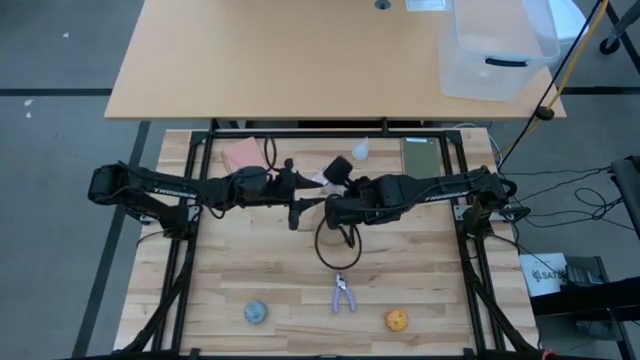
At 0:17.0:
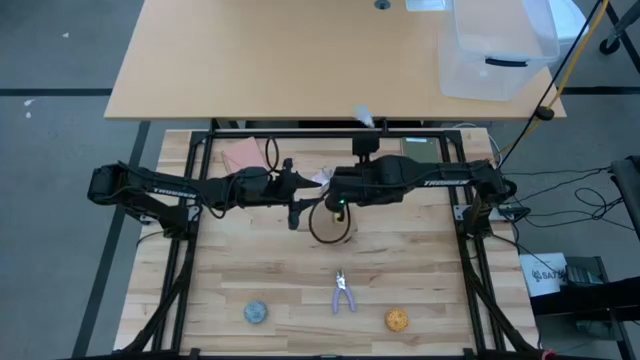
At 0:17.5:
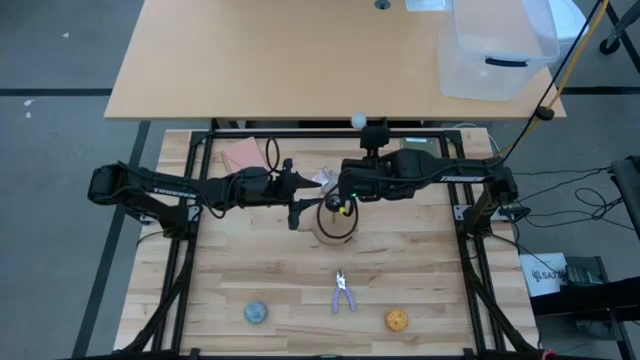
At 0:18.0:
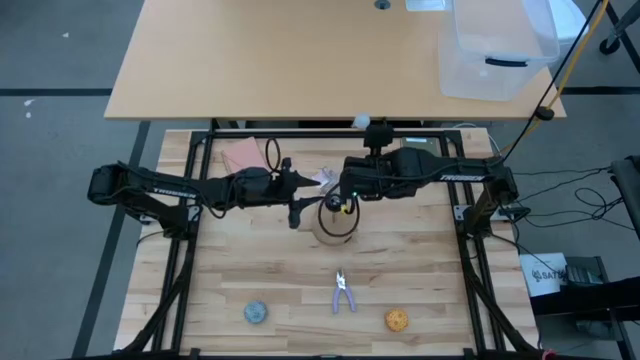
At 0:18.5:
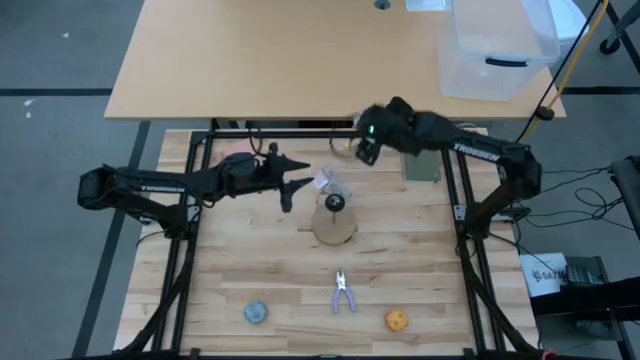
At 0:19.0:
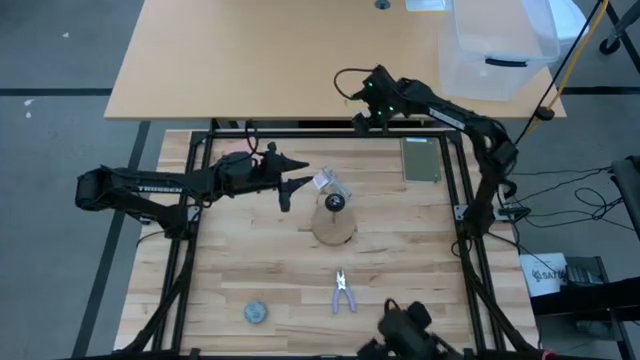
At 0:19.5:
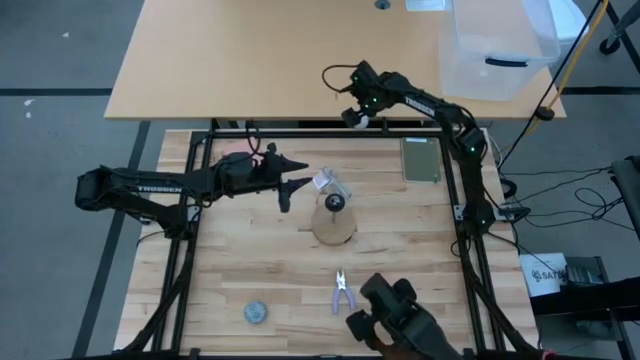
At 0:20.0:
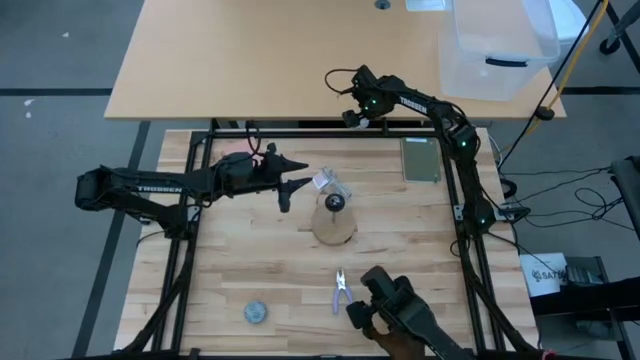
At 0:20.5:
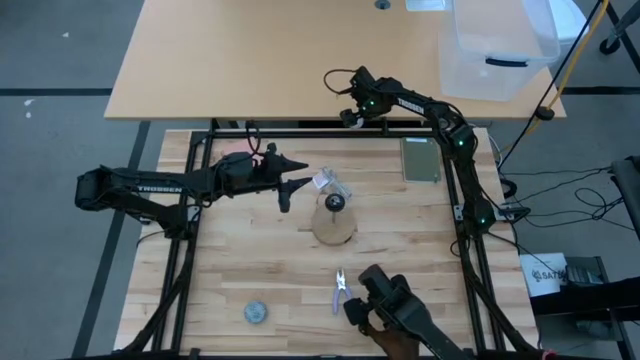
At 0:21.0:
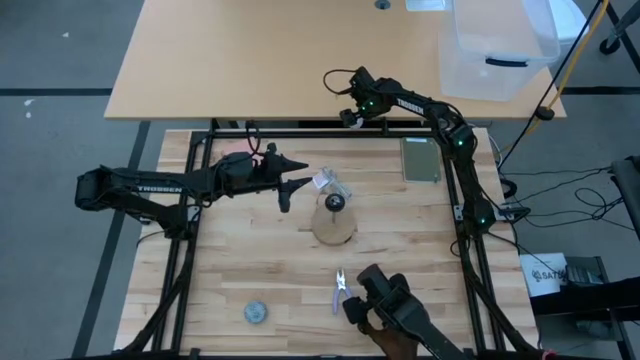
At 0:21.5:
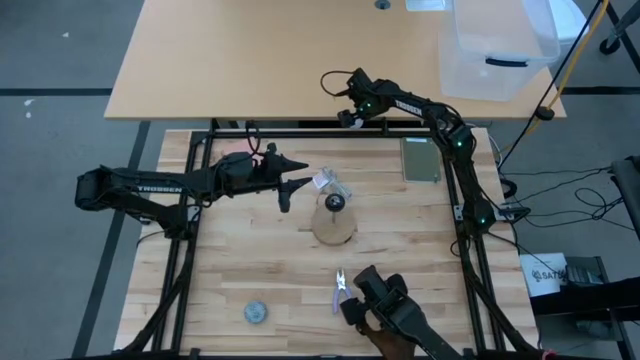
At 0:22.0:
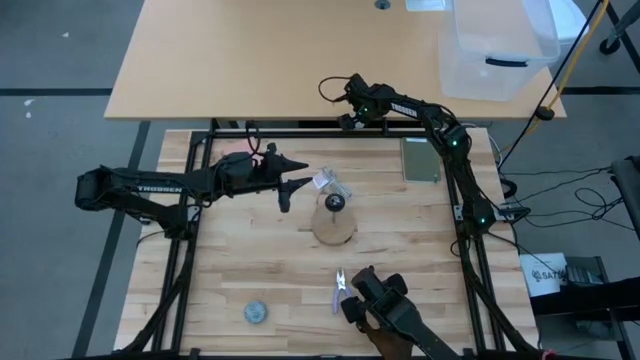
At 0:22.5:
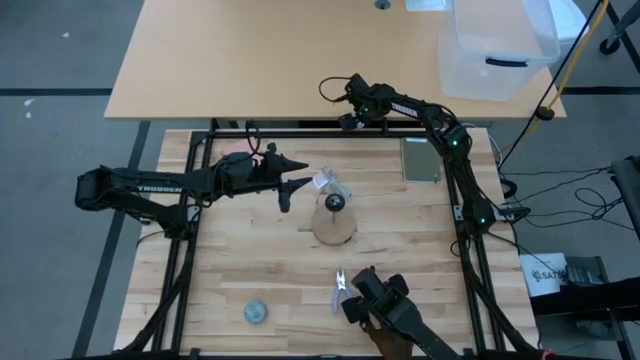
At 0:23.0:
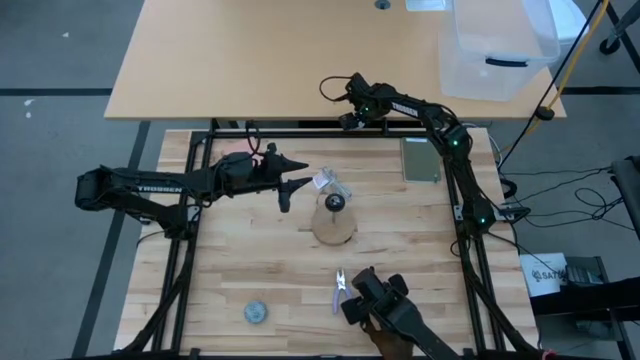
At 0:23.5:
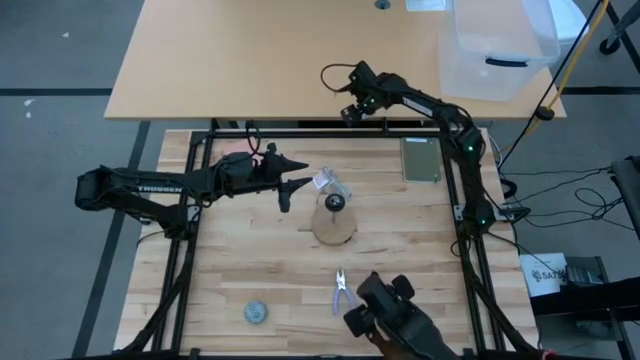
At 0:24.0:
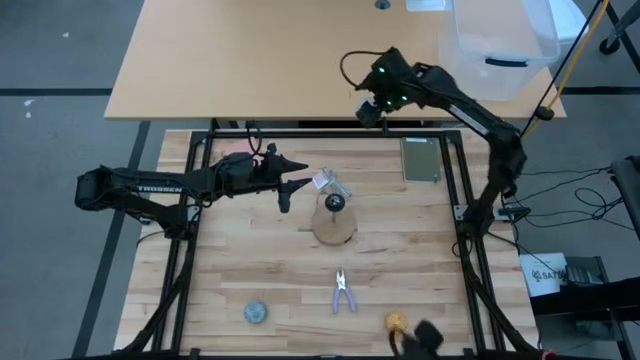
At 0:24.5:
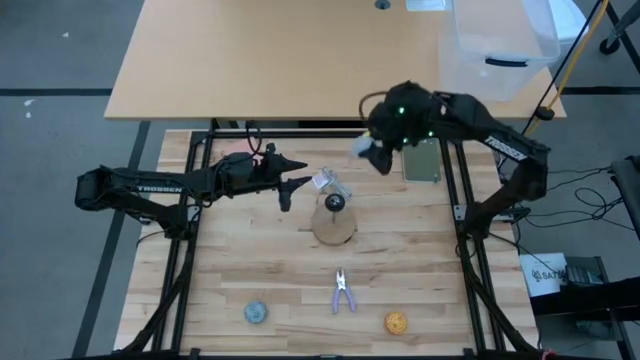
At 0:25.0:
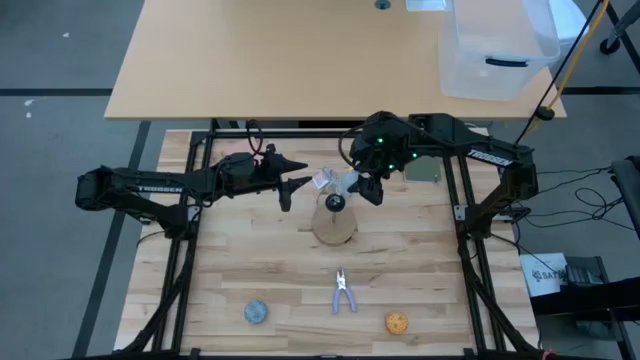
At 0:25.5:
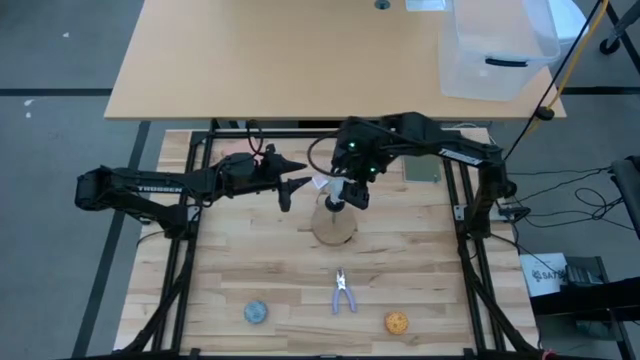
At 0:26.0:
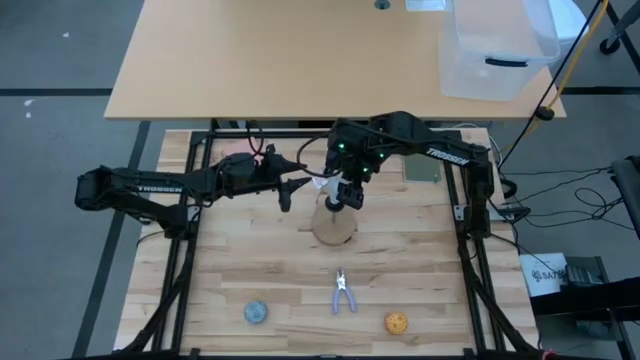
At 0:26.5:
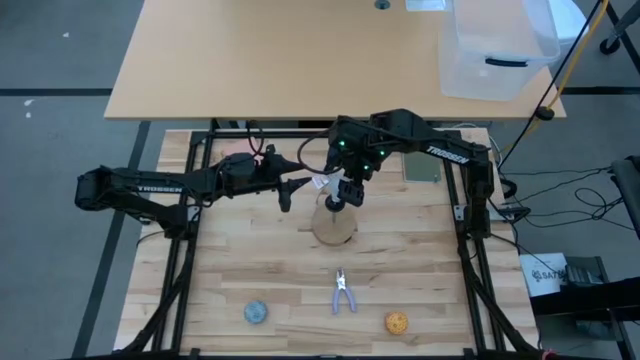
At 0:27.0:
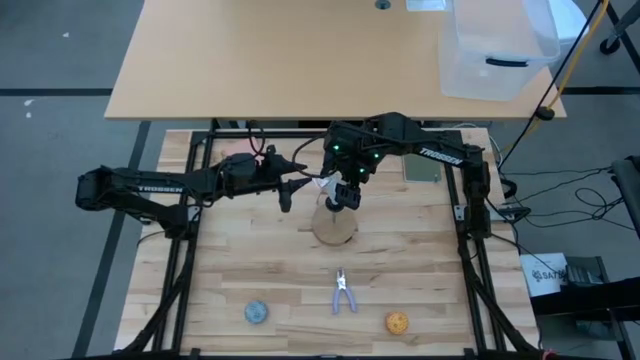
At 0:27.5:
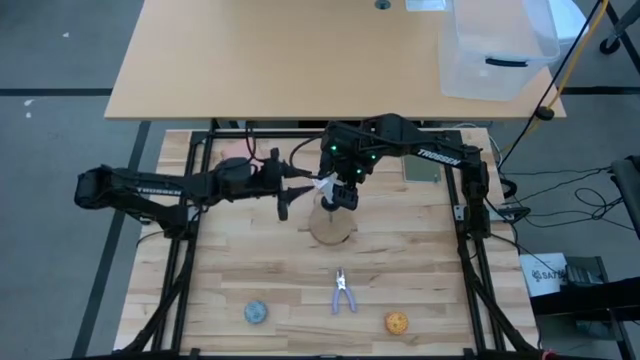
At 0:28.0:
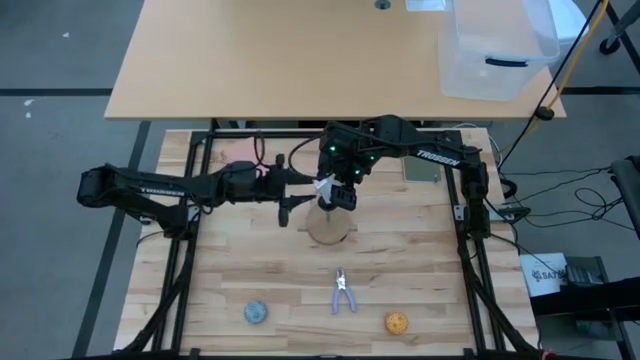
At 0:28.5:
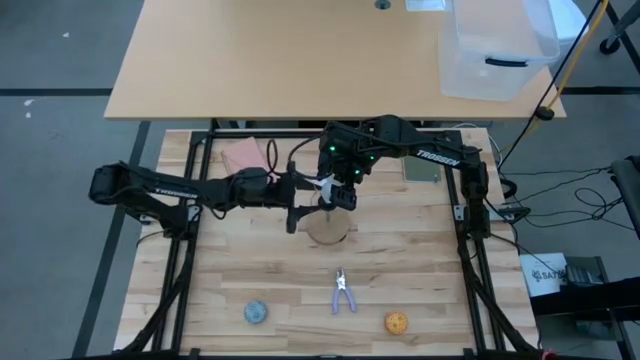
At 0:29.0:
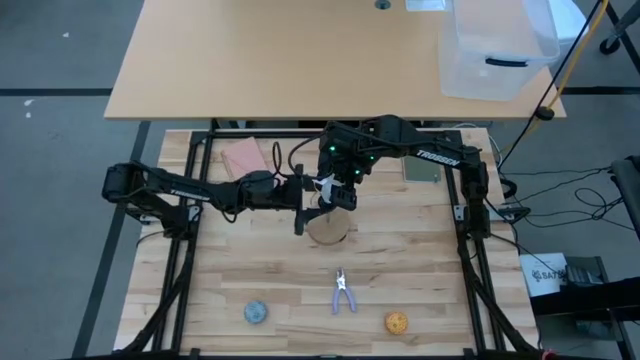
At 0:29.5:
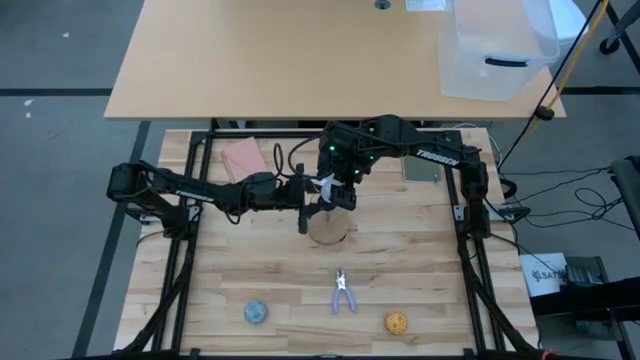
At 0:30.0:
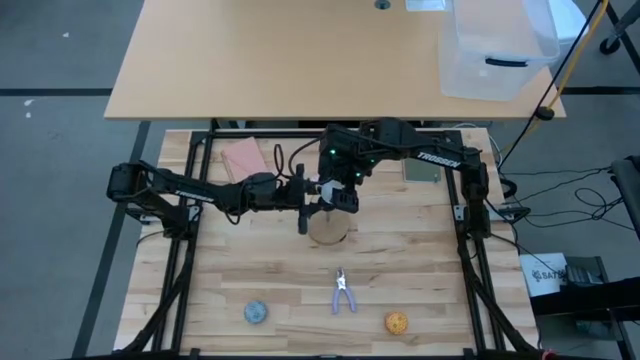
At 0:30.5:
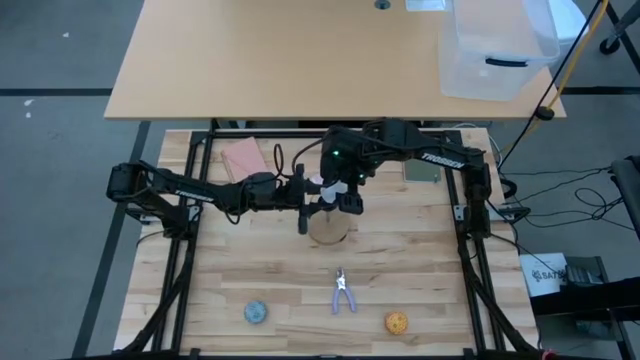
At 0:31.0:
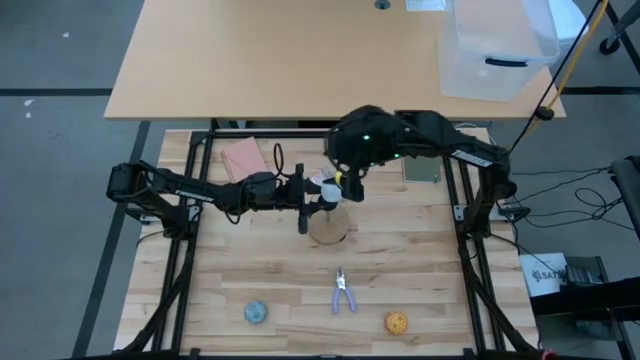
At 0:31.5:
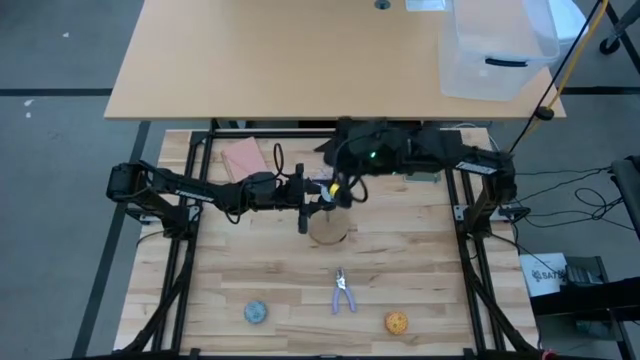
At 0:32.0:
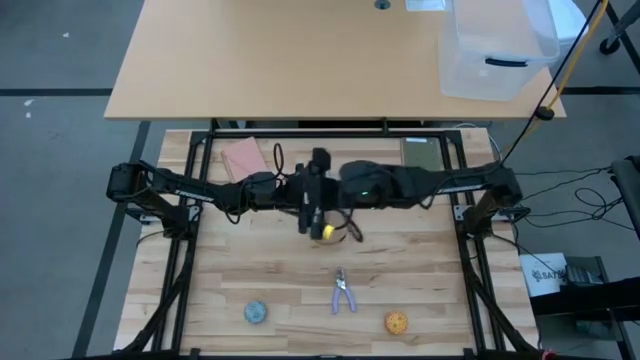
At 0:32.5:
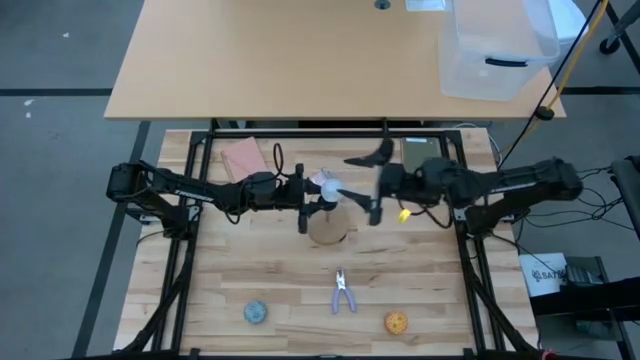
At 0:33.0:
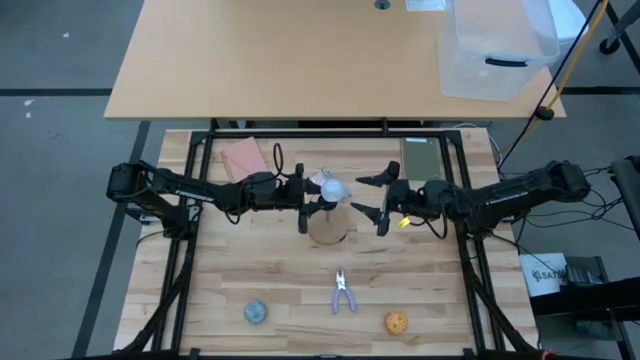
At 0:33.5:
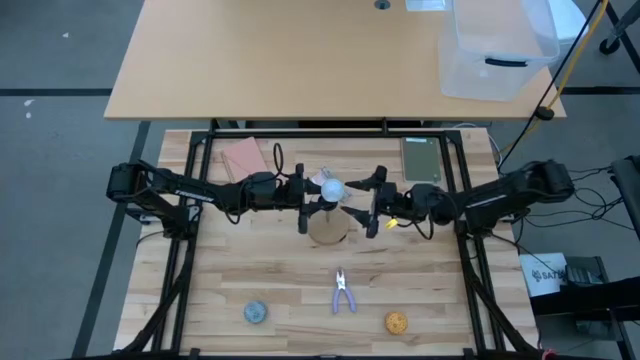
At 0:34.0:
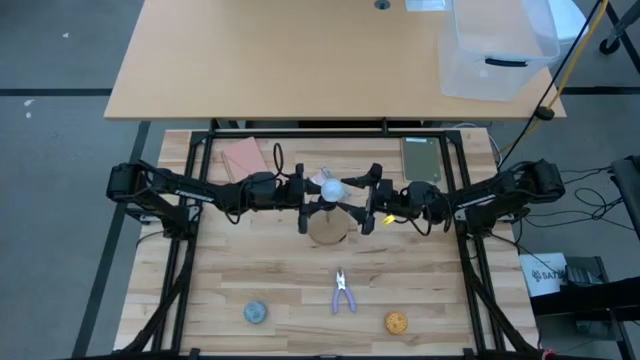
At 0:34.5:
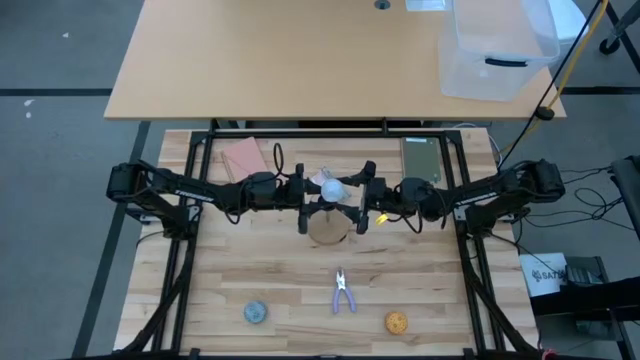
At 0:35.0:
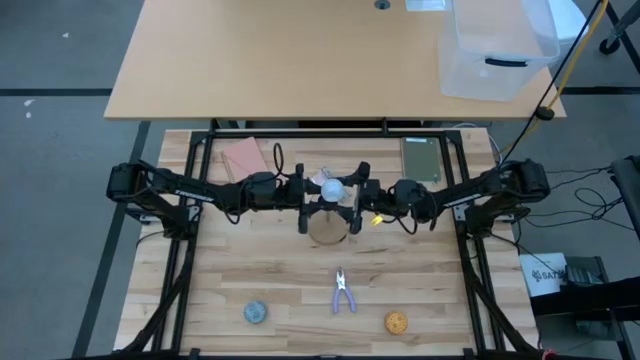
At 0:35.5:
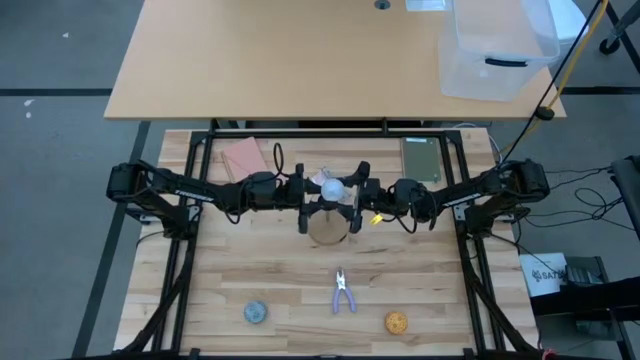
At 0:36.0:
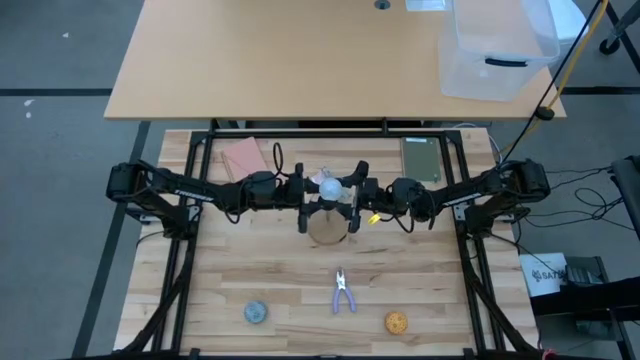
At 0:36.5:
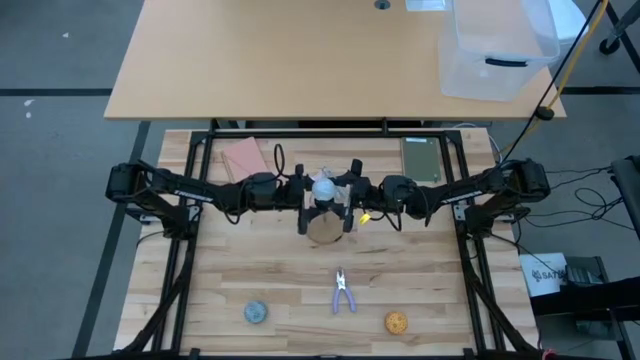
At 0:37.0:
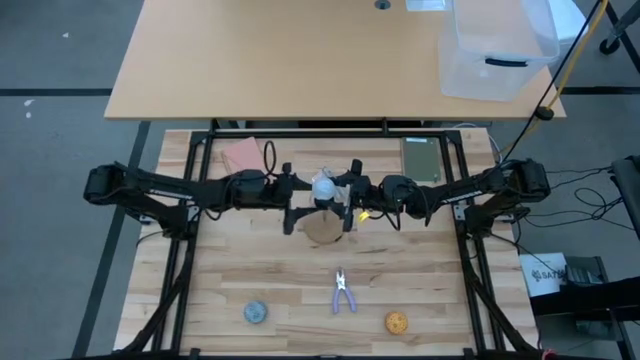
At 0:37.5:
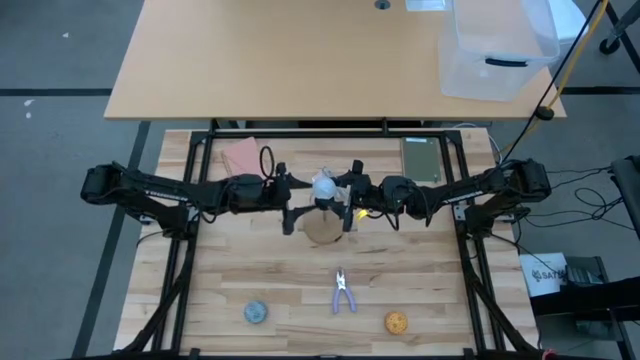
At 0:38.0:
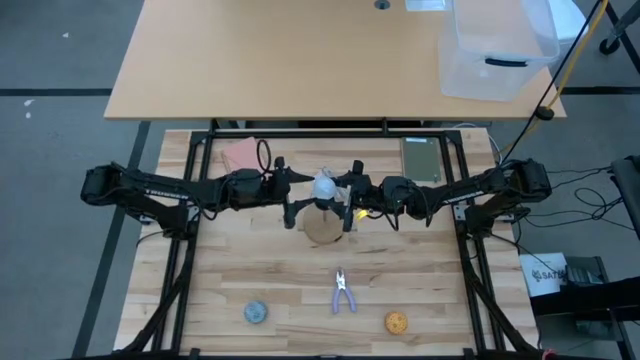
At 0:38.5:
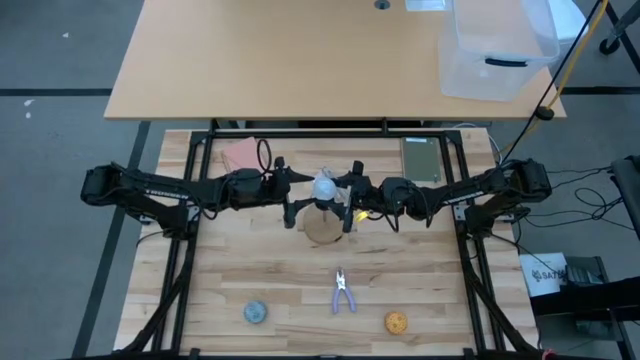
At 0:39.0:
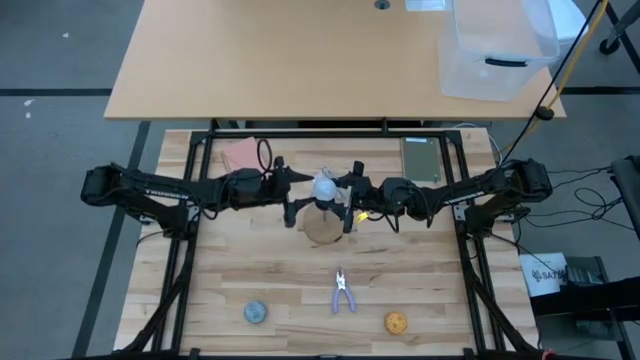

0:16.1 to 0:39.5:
Task: Screw lightbulb
Insert the lightbulb on the lamp
